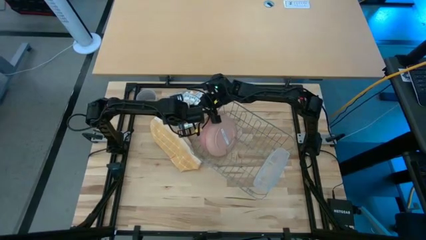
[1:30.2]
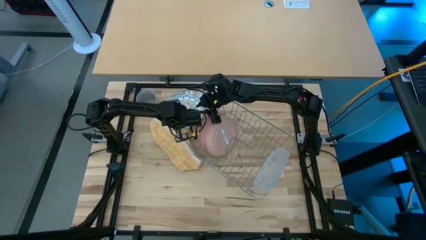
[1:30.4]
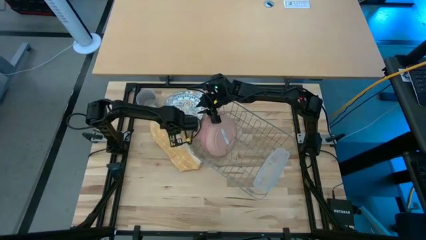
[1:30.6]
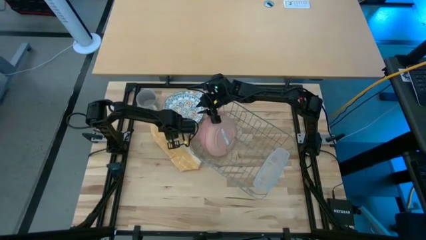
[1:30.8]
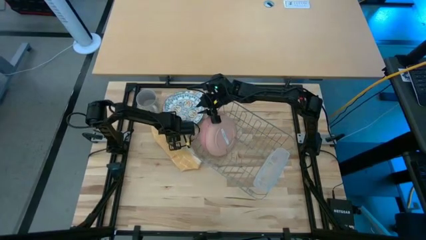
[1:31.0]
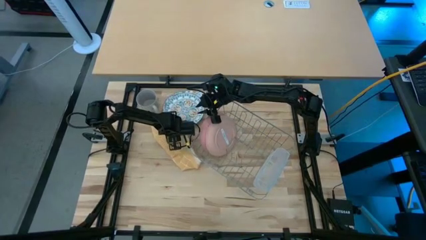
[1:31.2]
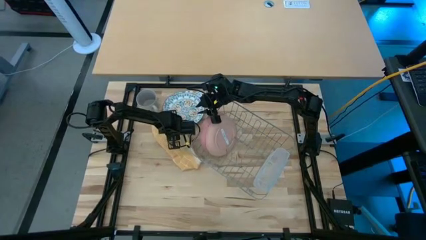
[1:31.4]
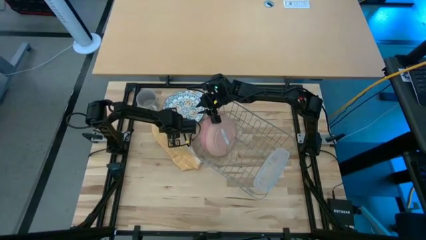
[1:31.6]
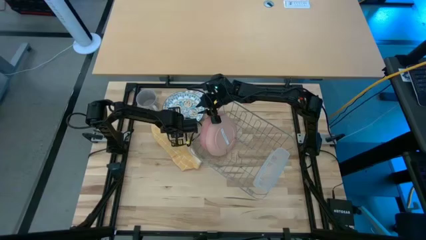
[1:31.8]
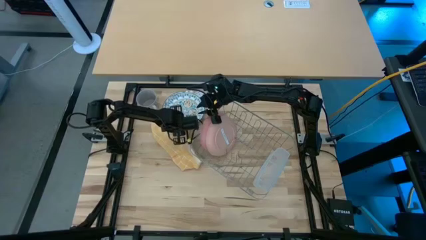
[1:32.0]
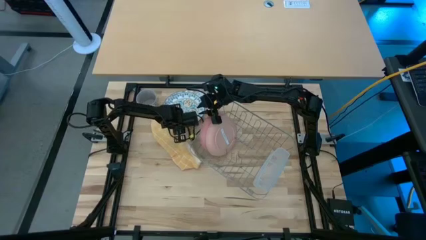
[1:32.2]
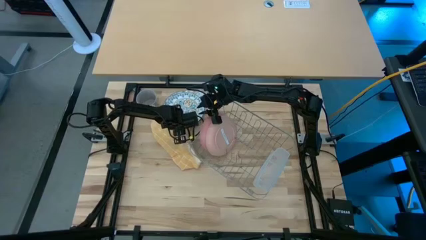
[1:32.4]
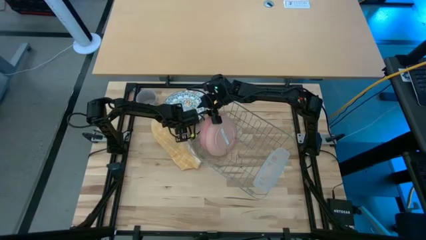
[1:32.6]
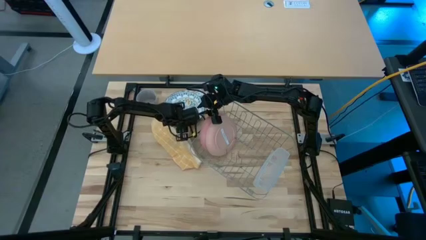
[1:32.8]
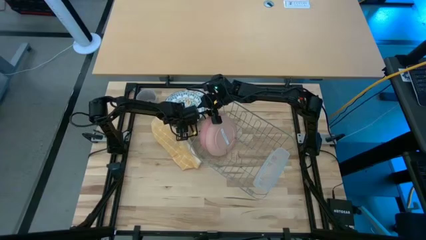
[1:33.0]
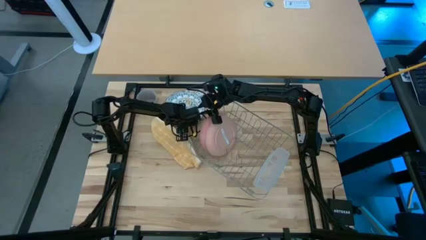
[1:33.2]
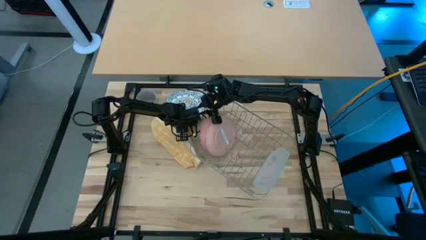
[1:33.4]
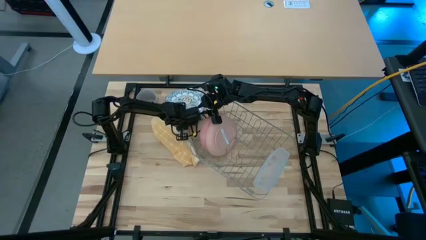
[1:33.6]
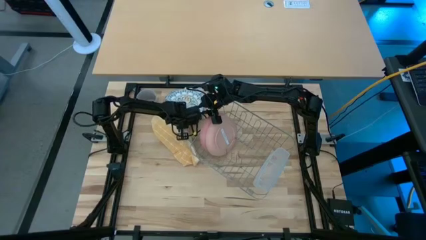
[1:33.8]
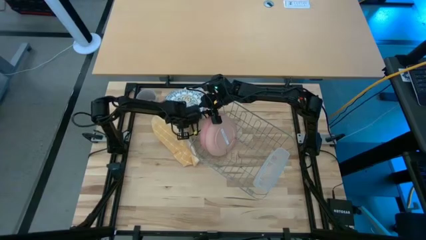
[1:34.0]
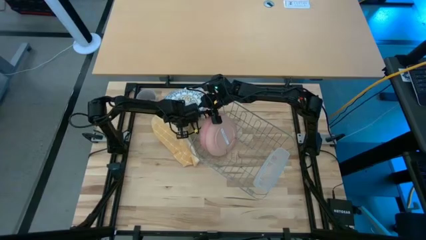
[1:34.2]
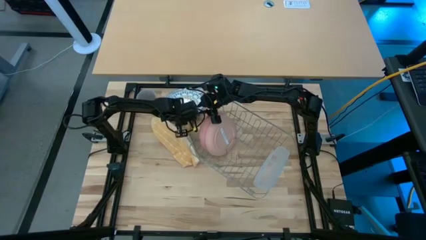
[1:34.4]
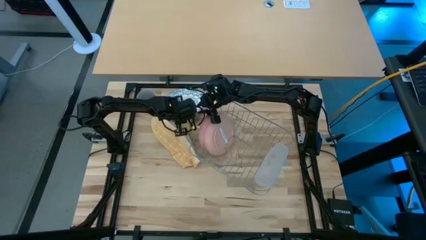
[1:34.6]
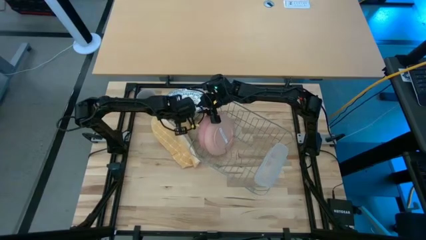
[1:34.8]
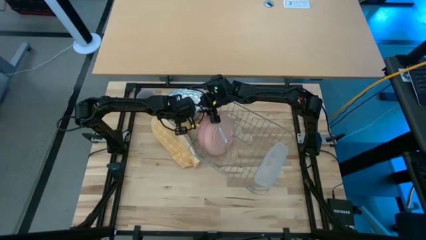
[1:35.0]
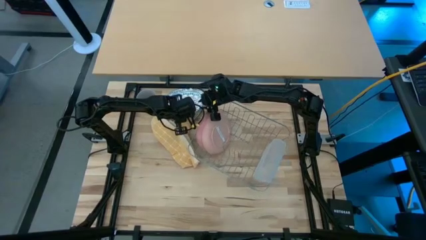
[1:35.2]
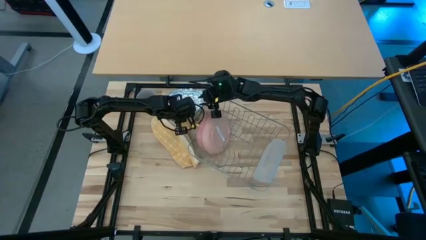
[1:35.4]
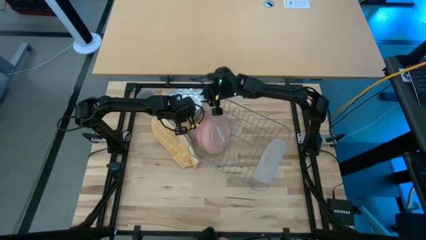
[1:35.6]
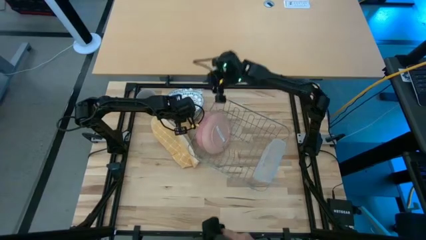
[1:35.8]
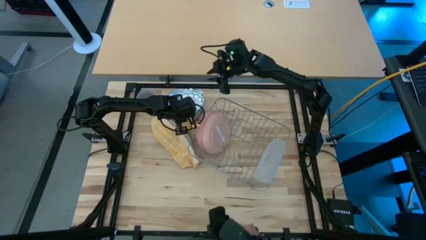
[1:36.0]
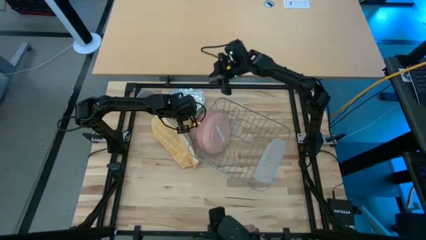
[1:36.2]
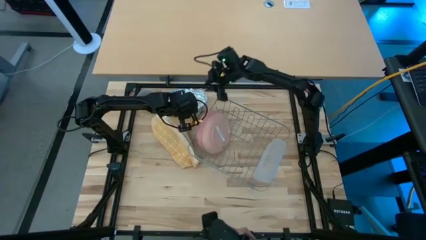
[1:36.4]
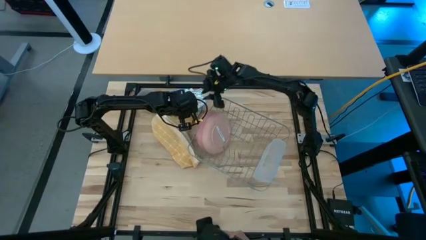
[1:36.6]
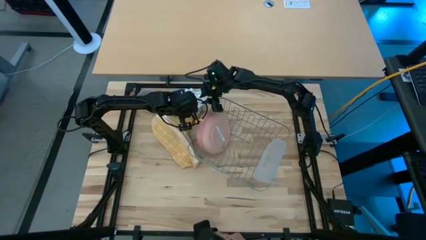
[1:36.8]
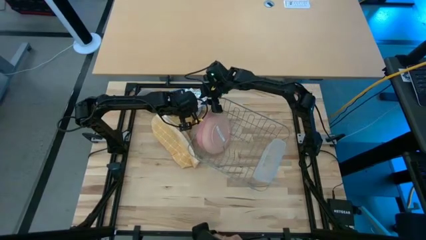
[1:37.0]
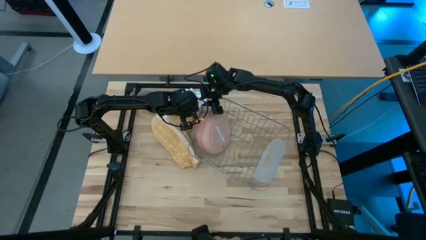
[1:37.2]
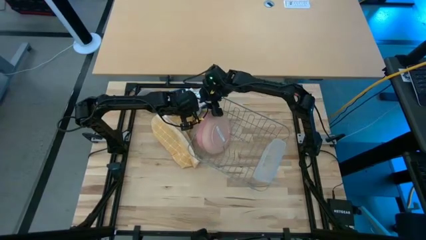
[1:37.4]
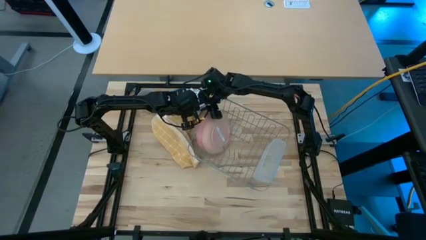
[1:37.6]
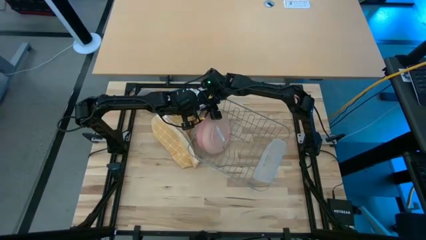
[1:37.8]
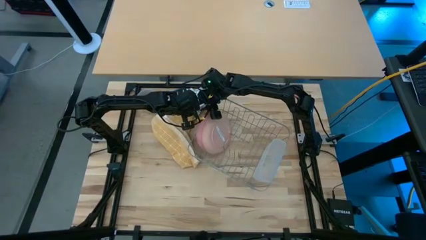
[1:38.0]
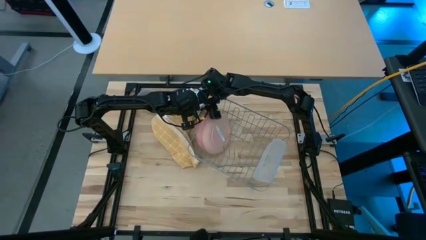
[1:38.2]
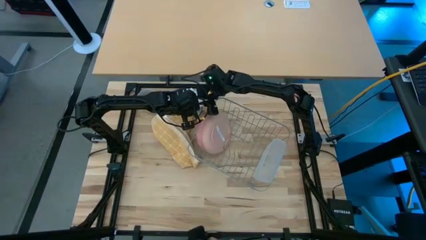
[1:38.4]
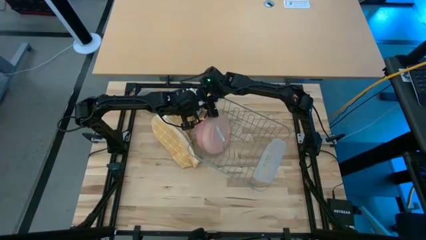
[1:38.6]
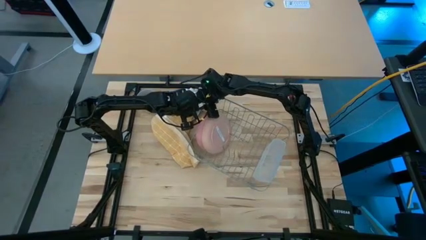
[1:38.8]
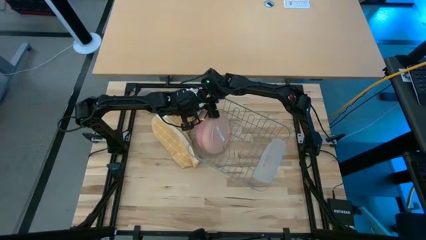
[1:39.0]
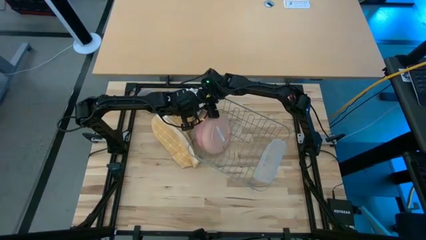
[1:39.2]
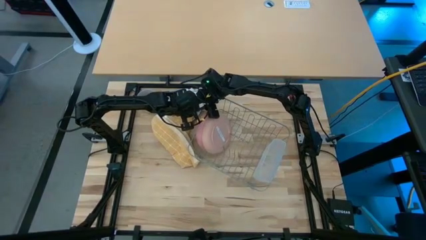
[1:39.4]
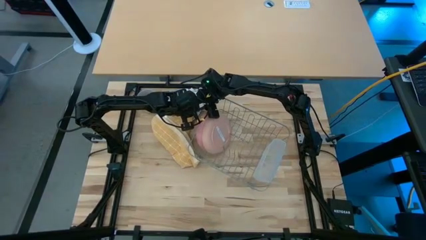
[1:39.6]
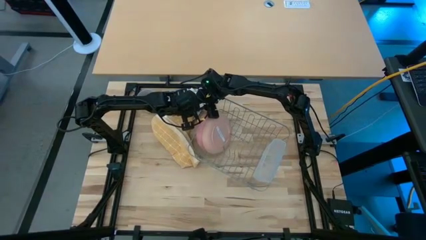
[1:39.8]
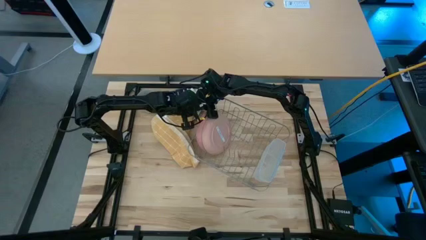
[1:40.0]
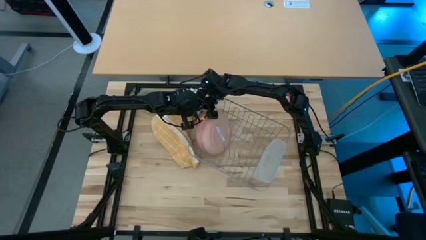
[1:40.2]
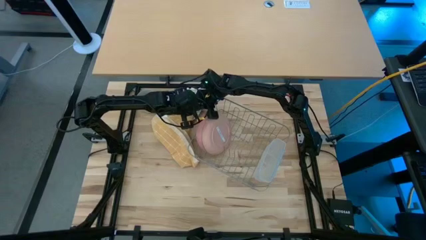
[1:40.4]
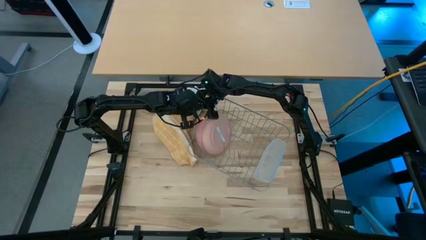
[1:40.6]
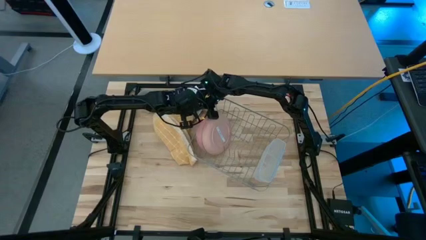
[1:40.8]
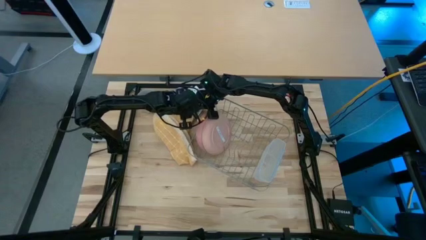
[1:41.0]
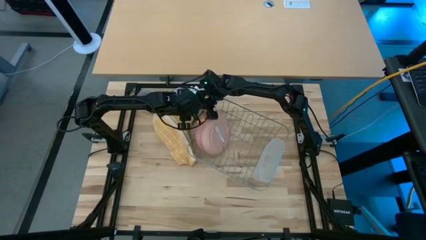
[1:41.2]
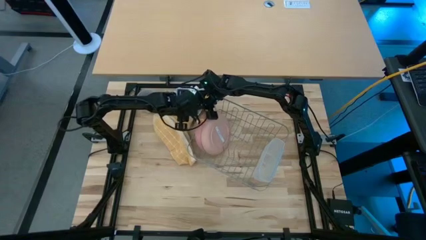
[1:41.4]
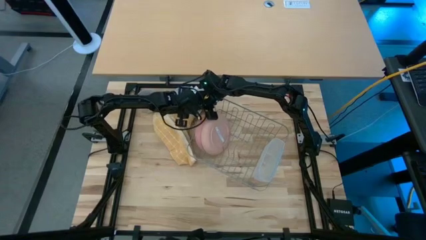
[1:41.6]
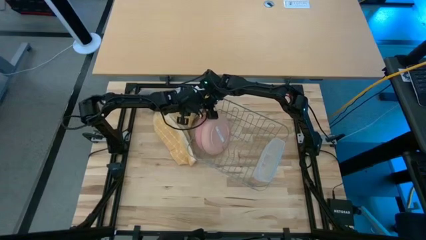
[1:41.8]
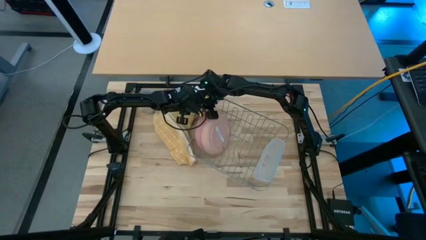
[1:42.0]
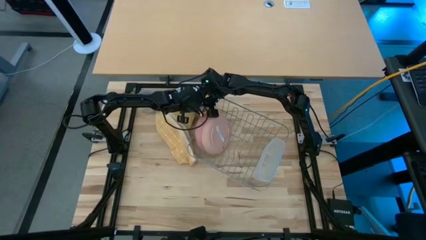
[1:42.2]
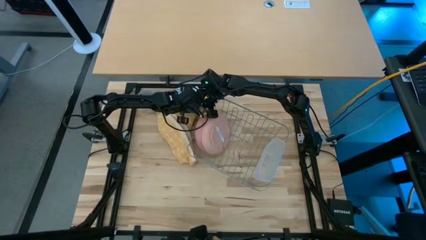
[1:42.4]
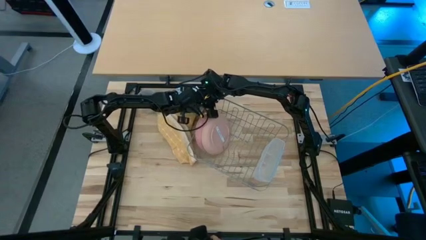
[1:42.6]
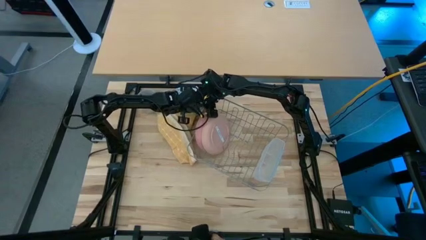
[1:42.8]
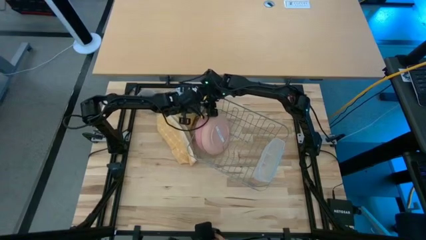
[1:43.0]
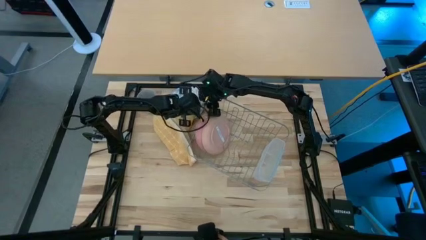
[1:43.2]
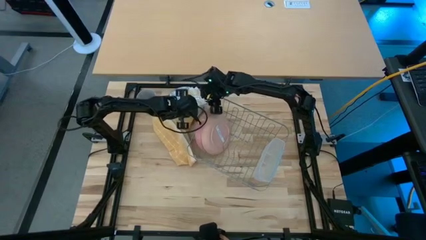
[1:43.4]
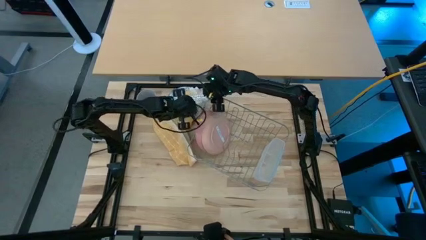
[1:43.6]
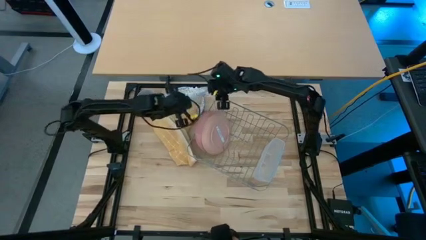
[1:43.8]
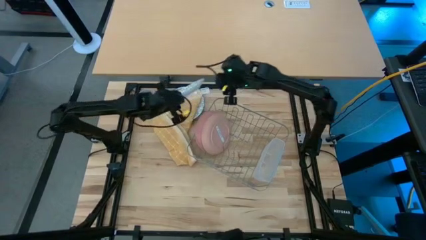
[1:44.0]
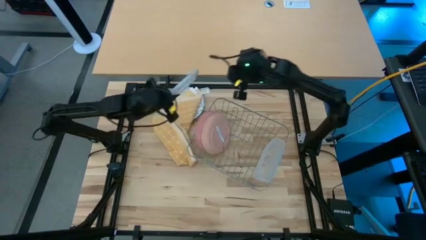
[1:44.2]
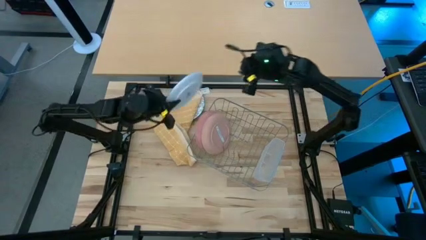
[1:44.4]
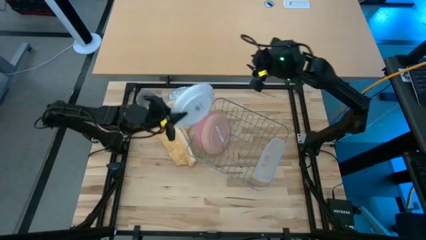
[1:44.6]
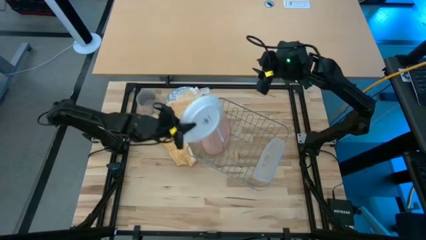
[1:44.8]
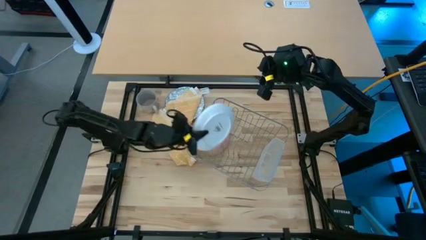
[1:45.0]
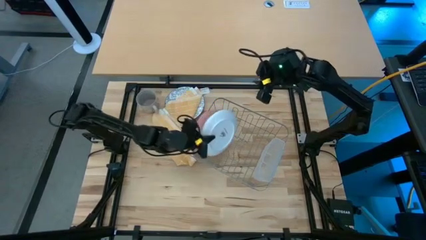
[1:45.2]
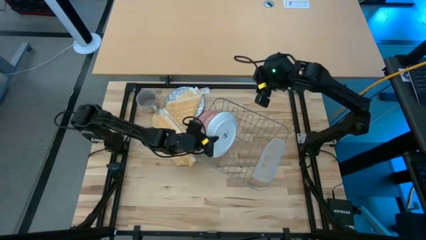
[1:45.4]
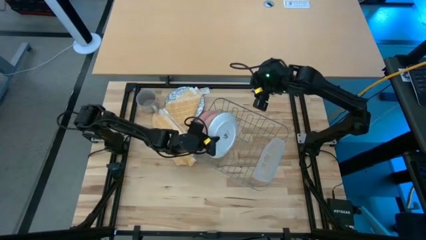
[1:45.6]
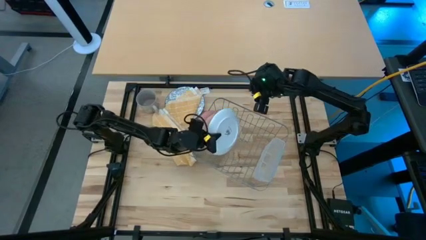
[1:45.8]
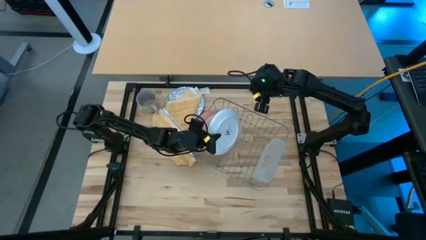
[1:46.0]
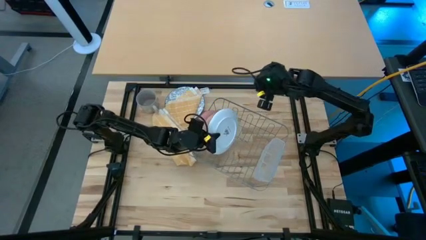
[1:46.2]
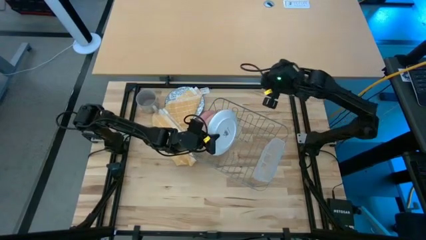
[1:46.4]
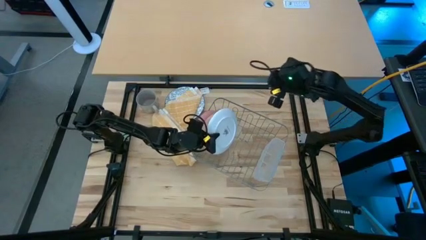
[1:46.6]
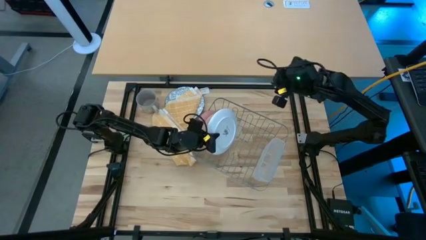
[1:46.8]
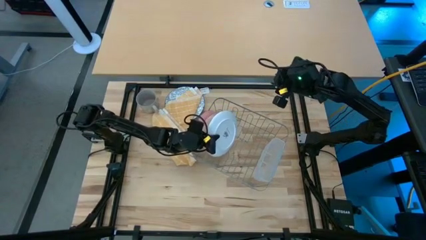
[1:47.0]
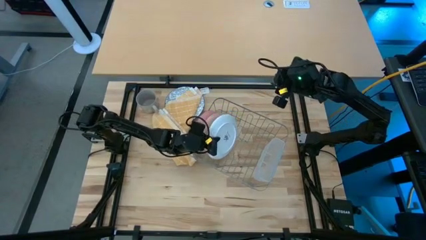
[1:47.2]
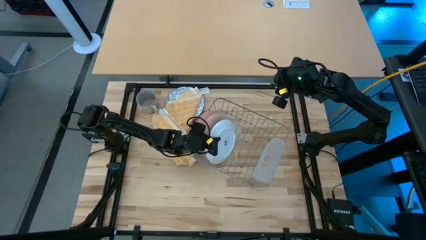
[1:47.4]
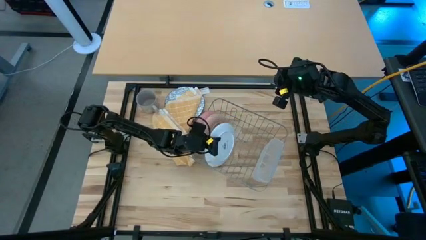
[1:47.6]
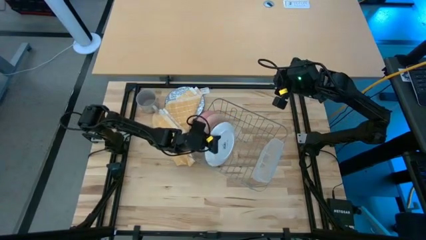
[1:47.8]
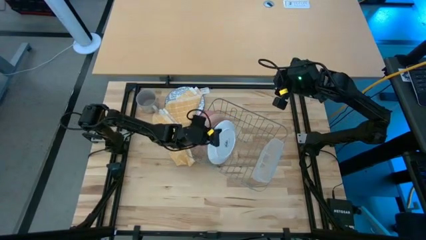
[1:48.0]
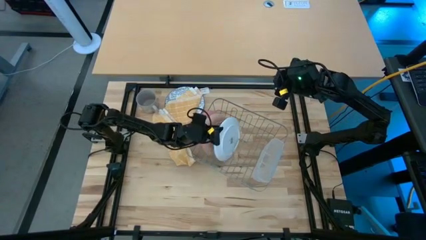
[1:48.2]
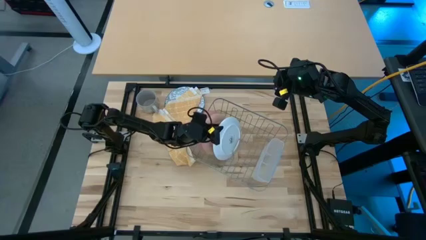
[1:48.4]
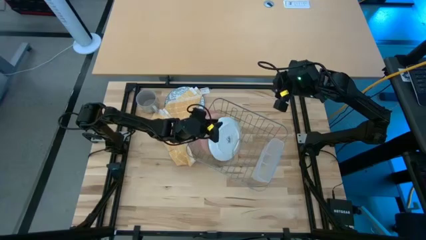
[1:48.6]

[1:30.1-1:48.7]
Task: Sort dishes
Put the orange patterned white plate into the dish rack
